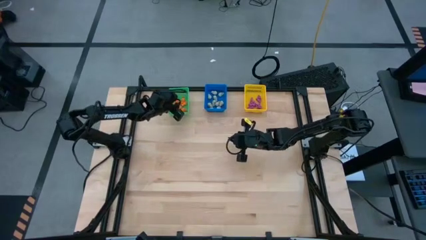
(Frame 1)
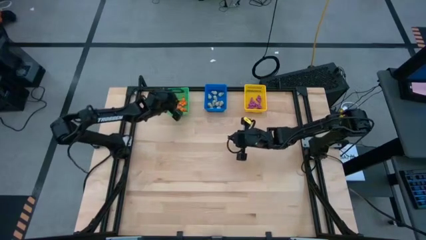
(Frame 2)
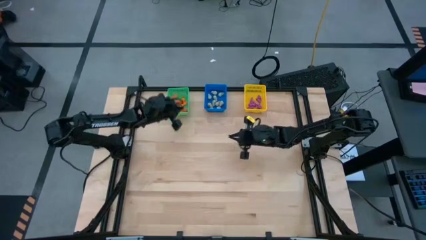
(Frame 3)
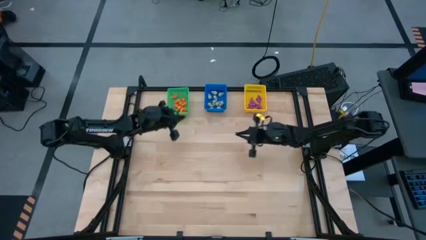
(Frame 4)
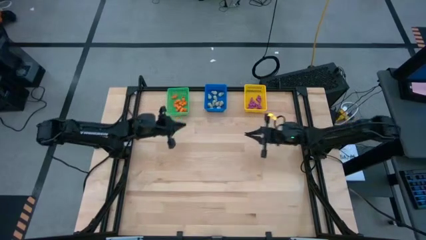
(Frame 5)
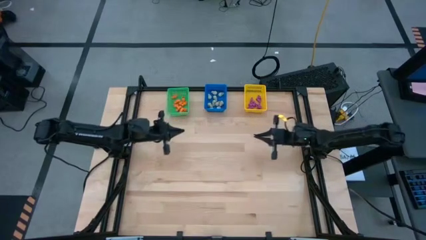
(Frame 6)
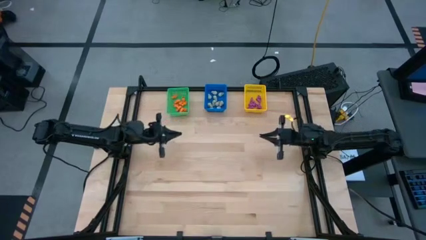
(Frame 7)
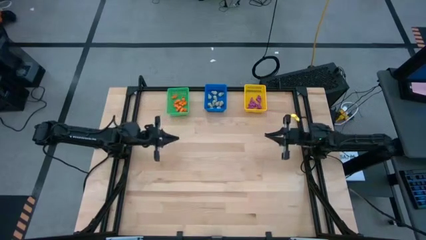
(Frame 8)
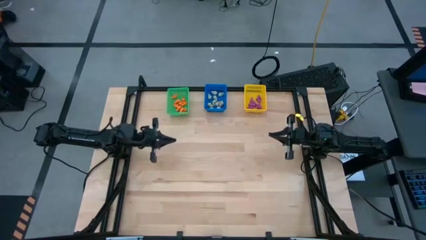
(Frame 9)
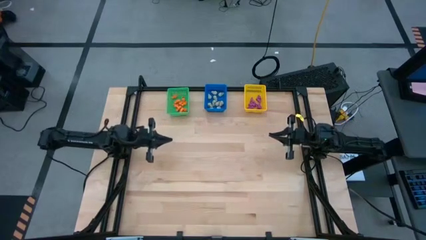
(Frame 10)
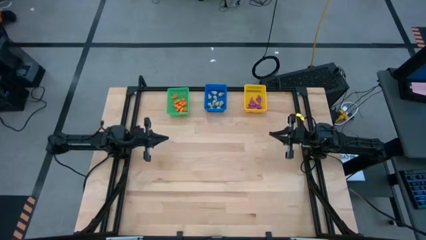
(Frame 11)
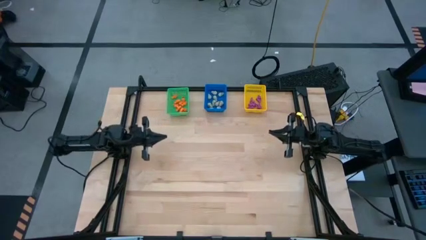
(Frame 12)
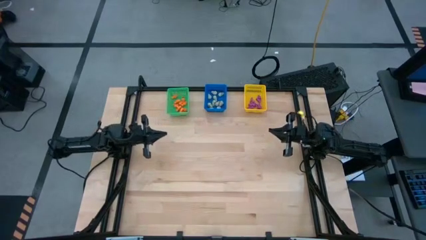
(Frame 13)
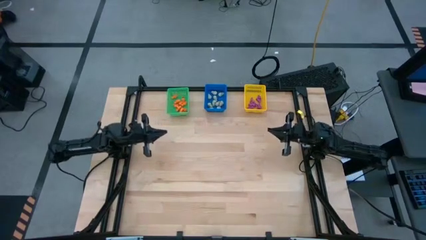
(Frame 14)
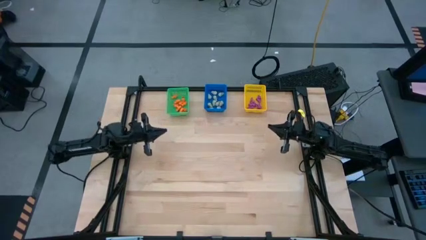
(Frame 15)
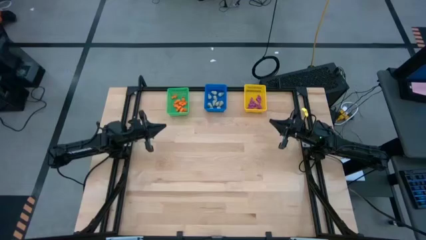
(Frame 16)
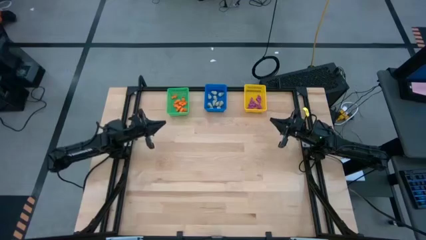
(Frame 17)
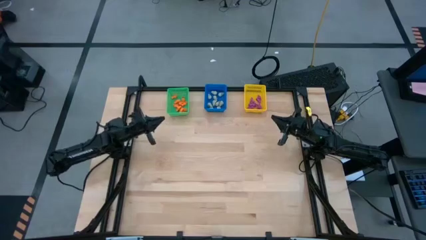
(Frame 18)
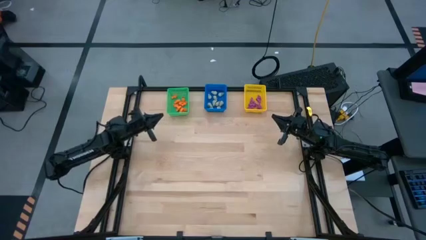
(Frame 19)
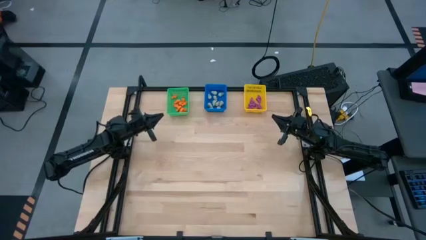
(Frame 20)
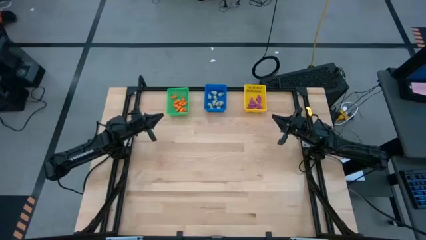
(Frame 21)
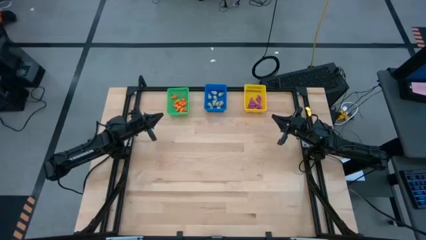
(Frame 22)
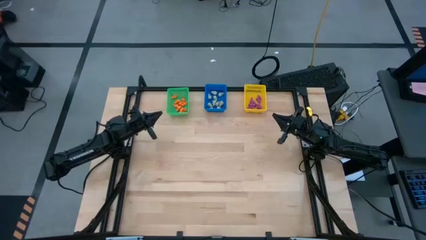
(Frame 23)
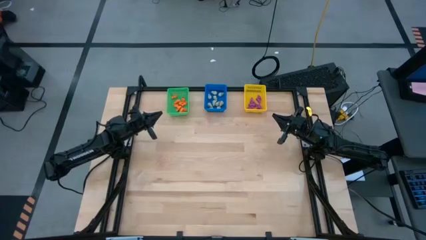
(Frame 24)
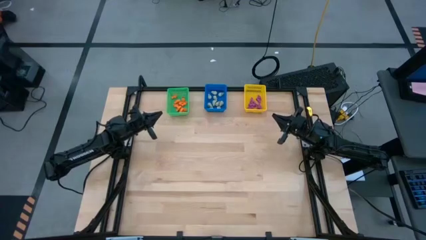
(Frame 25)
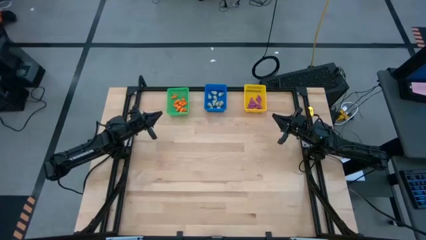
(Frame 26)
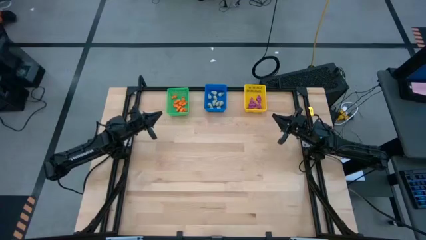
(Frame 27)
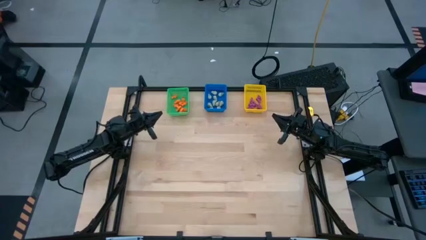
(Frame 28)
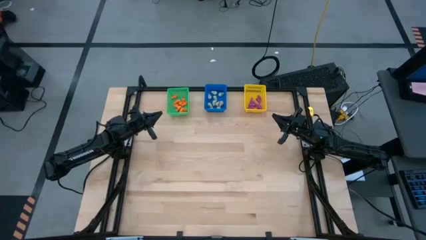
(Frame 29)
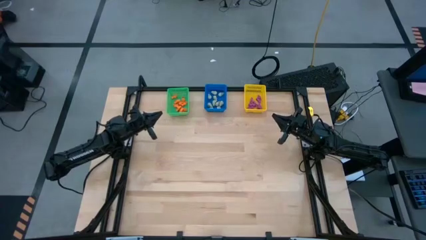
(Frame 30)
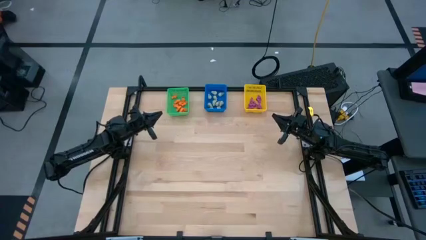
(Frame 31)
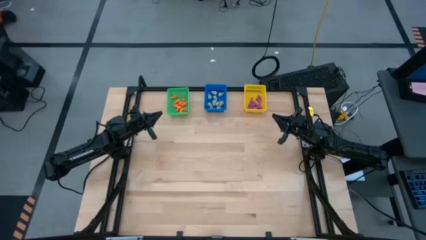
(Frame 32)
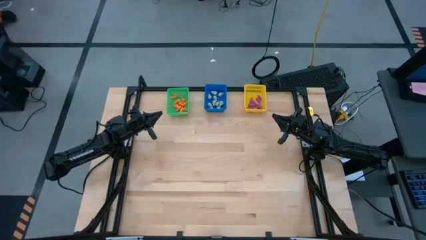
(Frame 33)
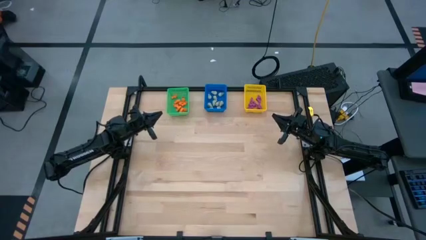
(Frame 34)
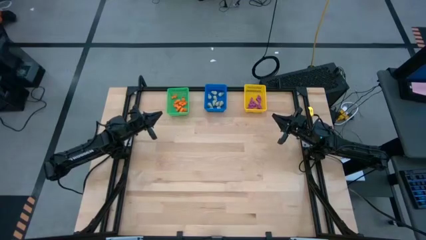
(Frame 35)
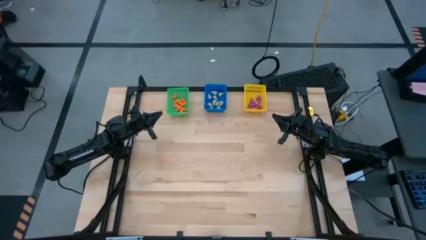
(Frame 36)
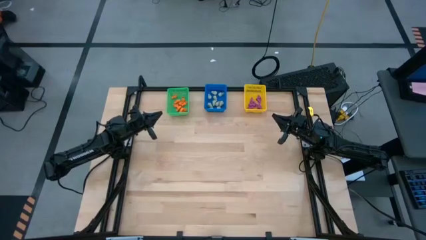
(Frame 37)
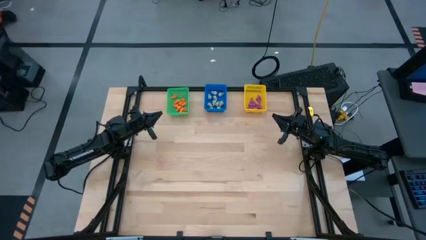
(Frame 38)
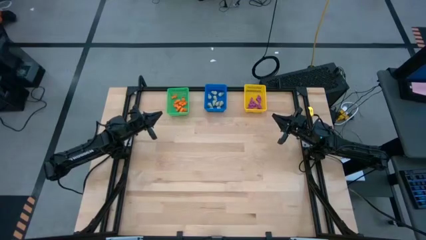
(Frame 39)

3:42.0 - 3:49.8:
Task: Sort Halloween decoration
Return to Home Position

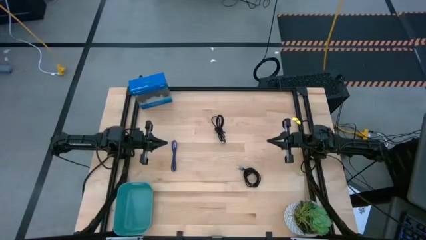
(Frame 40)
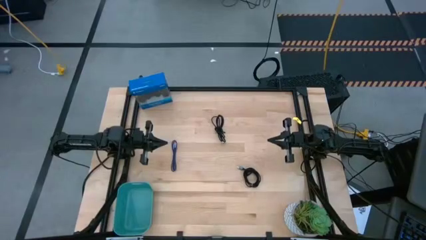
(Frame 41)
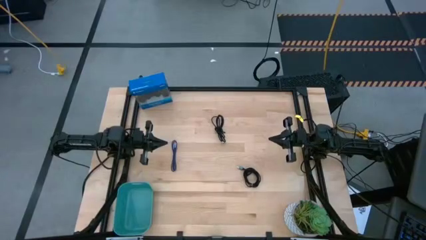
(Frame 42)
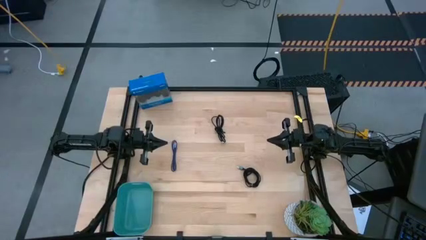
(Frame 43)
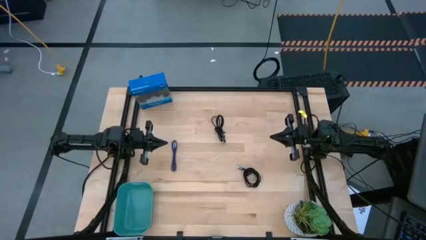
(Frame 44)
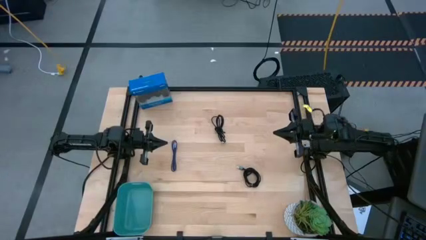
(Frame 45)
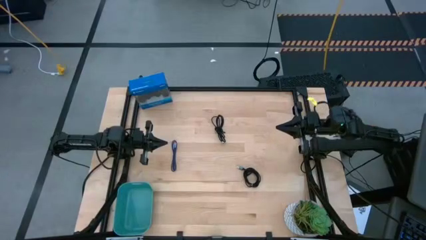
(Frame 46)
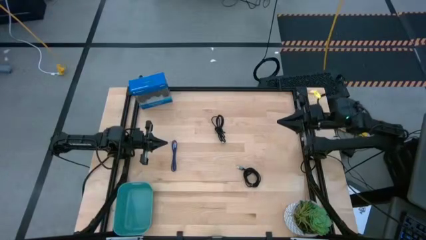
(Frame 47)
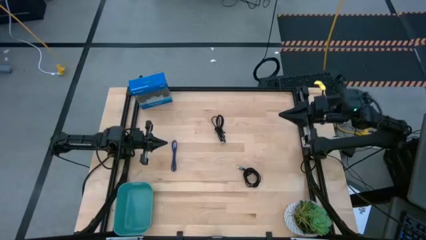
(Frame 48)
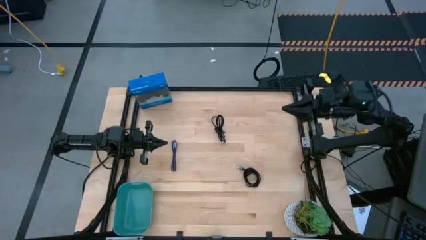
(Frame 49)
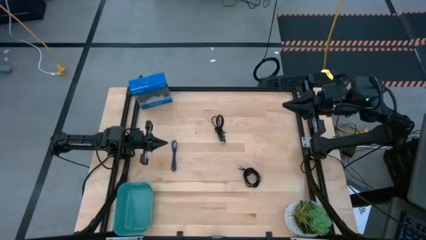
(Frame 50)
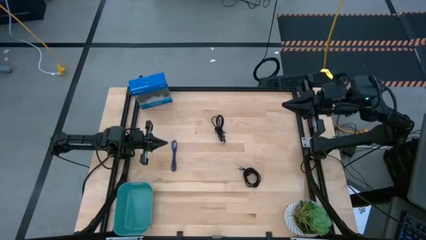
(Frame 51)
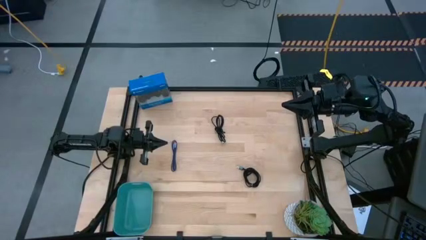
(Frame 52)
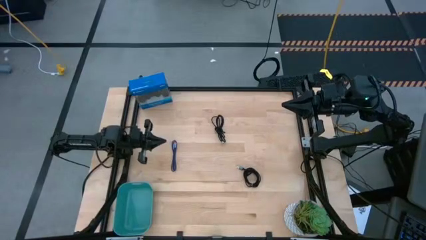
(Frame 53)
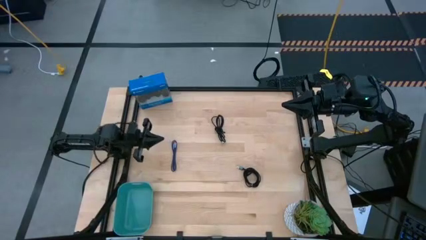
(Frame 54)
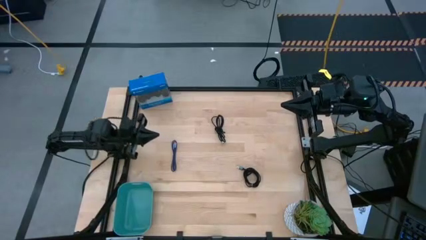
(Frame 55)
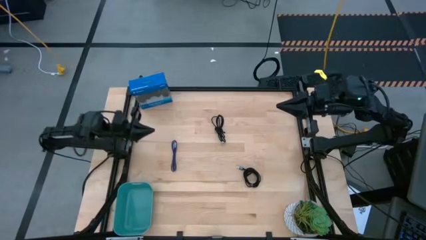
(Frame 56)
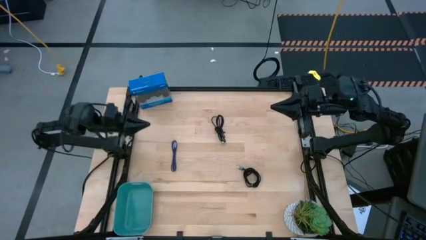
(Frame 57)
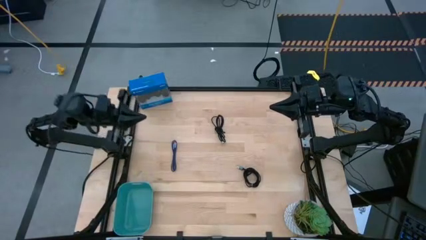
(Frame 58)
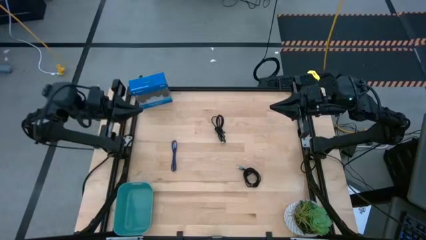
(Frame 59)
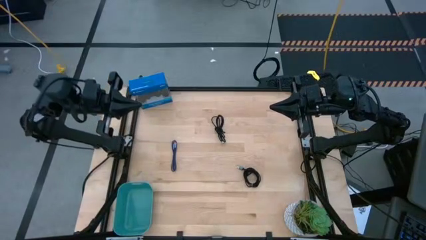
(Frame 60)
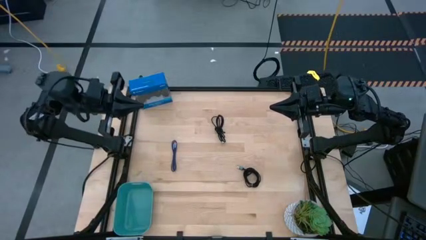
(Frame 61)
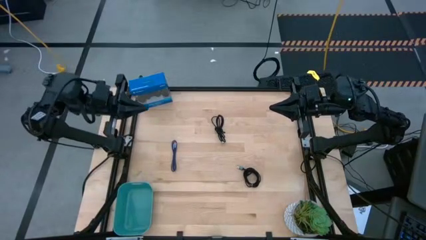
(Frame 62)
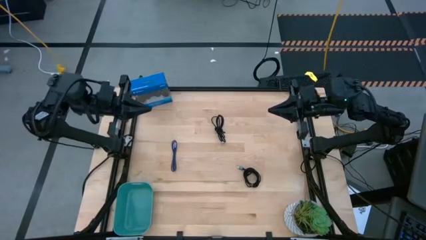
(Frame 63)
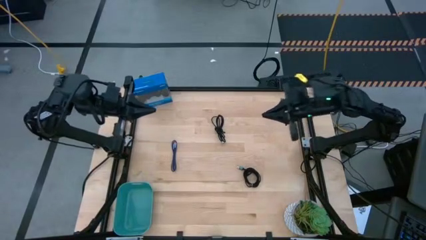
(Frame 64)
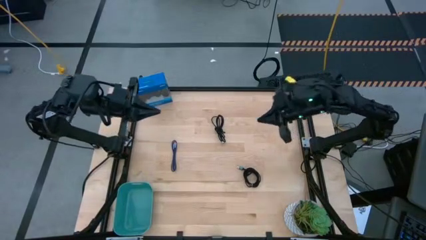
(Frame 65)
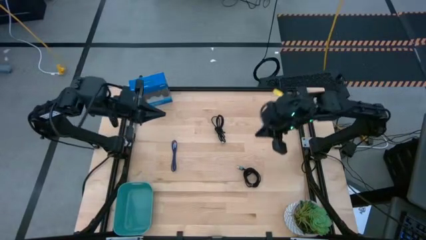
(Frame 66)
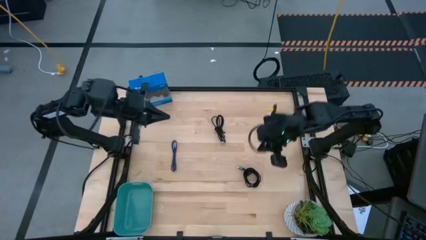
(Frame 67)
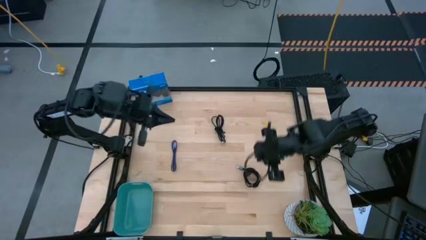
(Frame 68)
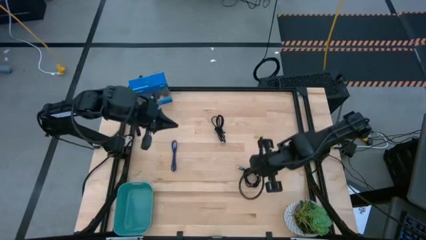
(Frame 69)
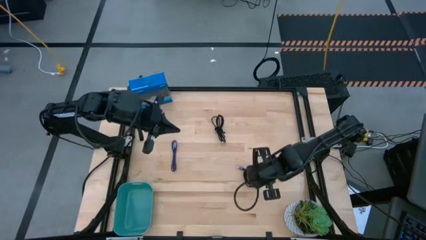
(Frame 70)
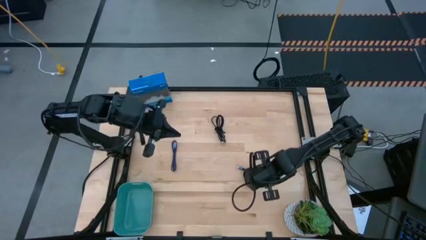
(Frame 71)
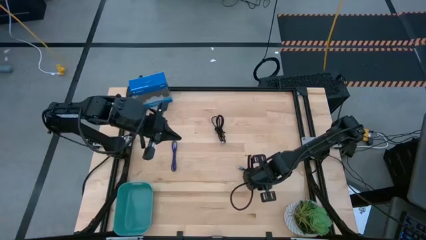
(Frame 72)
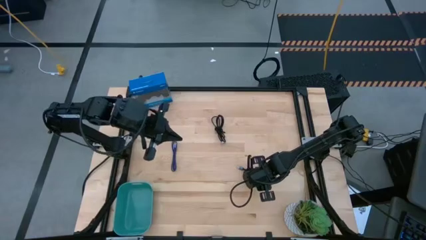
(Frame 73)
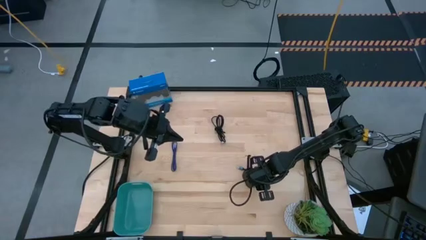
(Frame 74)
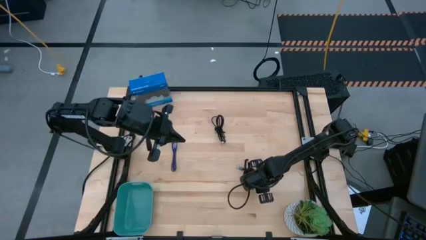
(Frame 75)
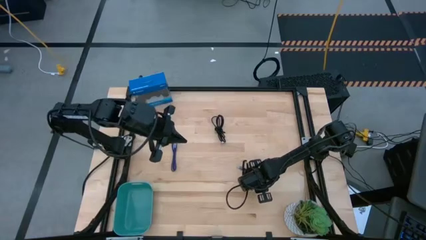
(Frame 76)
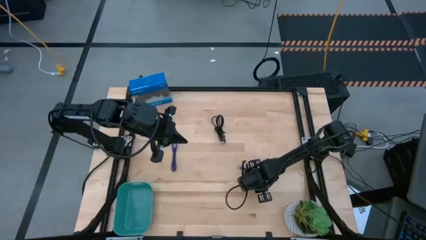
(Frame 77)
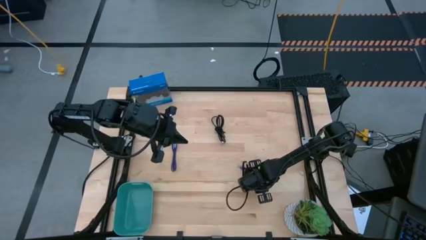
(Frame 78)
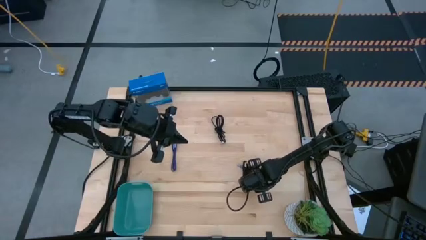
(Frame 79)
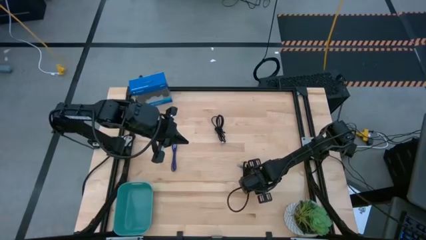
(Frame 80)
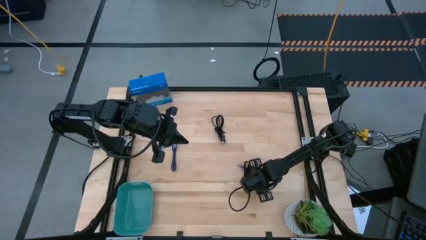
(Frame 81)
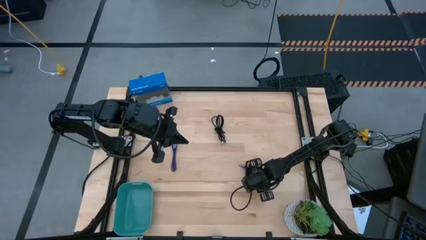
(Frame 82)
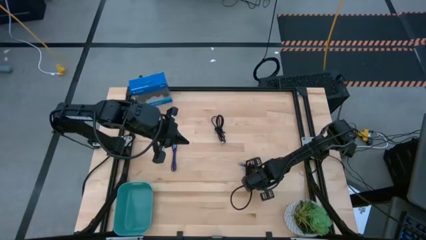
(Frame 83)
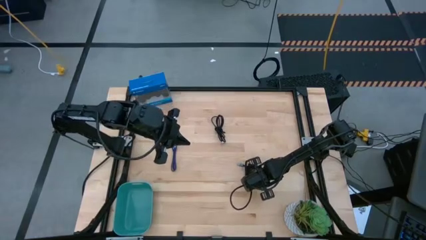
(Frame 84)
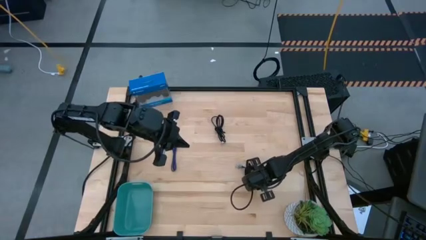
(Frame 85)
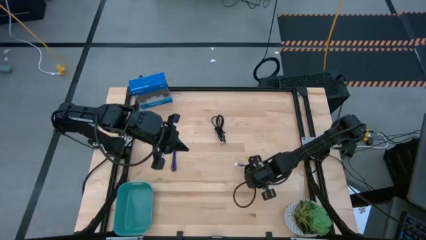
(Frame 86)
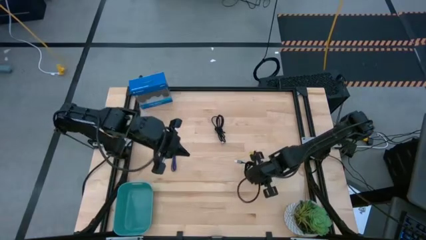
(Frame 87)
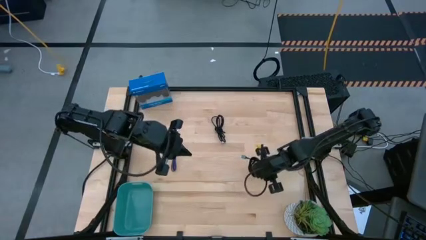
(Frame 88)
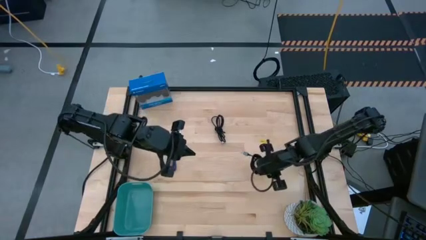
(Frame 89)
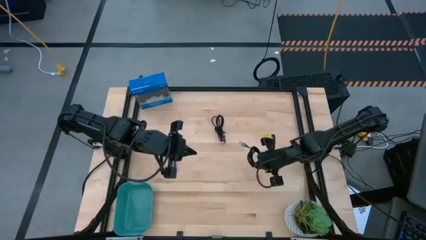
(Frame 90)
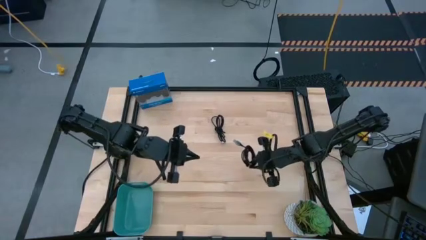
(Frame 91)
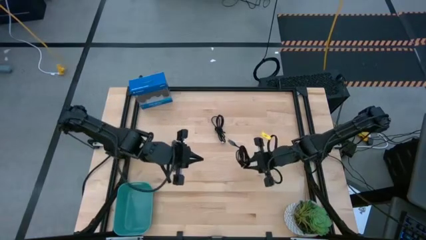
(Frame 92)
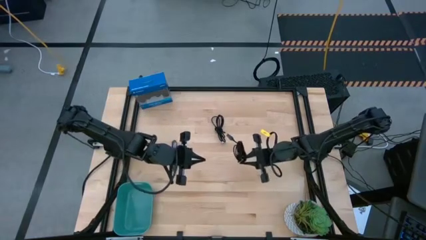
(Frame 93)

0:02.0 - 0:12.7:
Task: Pick and place USB-C Cables
Put the upper black cable into the blue basket
